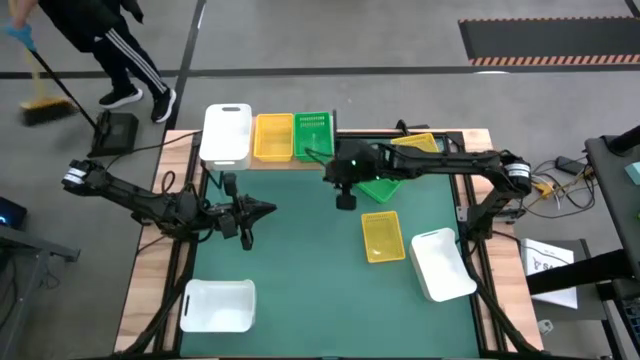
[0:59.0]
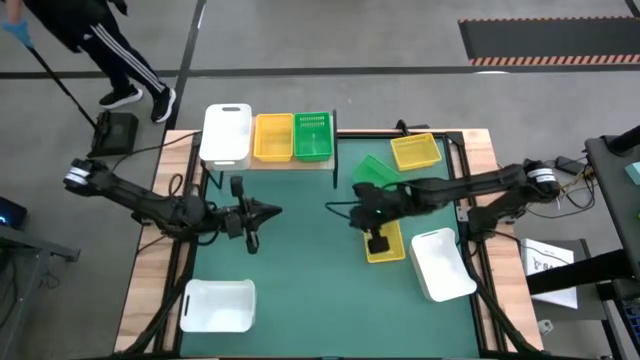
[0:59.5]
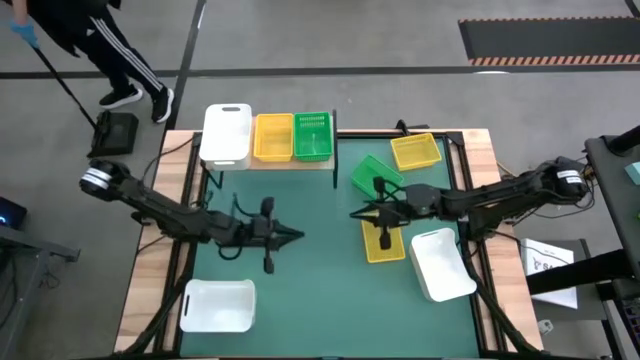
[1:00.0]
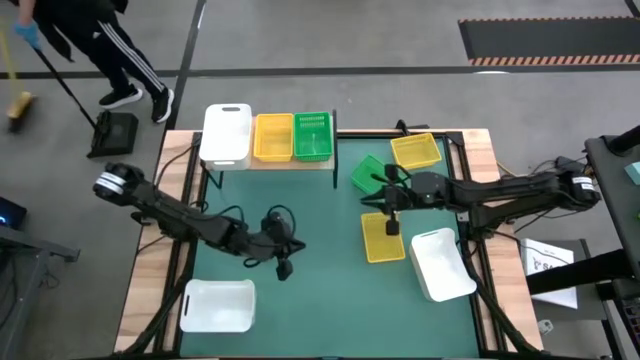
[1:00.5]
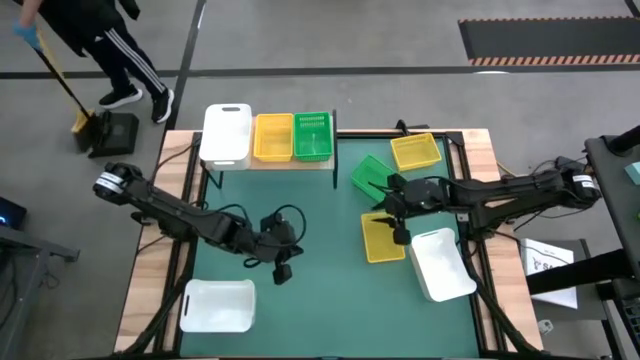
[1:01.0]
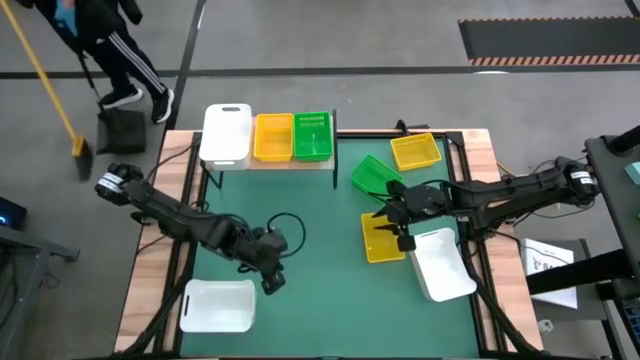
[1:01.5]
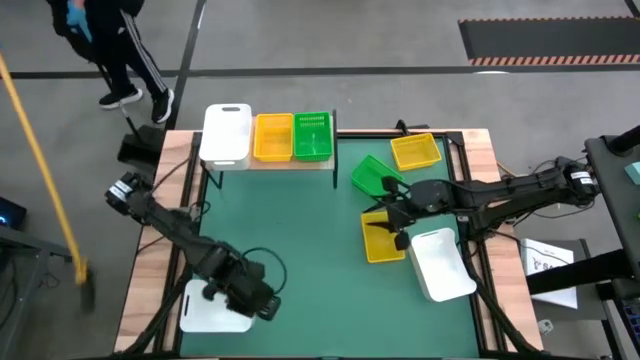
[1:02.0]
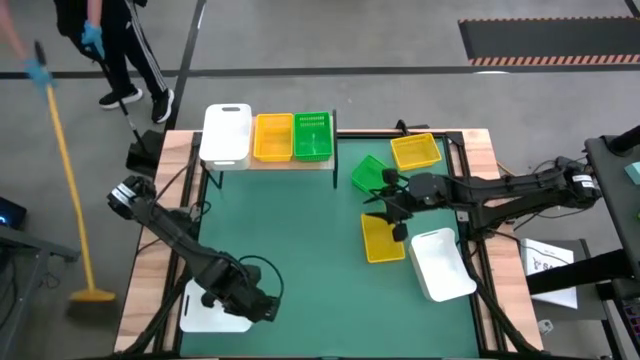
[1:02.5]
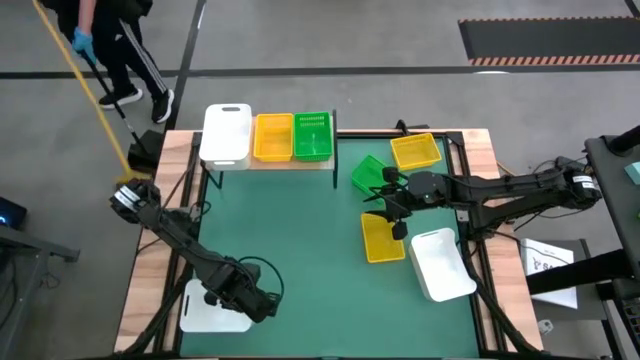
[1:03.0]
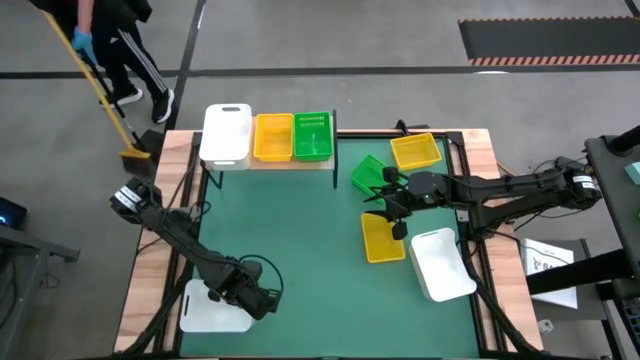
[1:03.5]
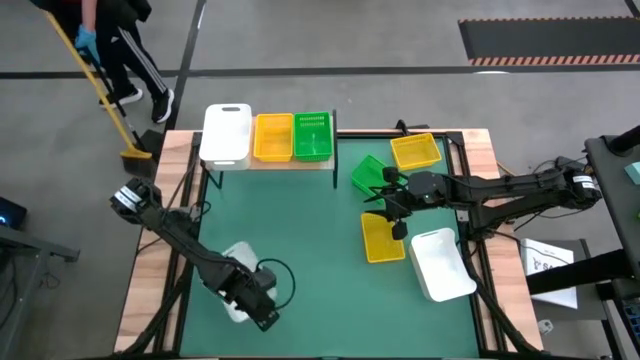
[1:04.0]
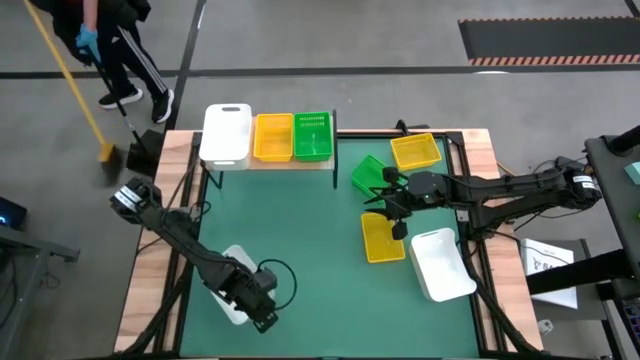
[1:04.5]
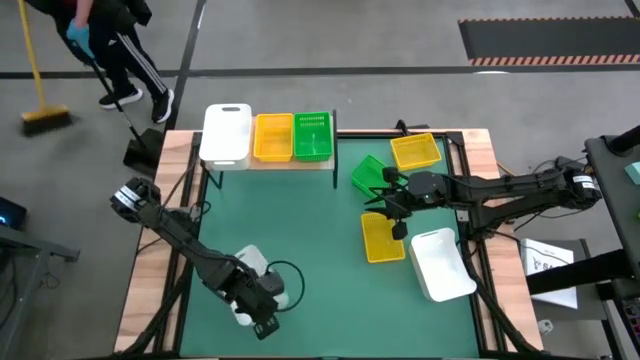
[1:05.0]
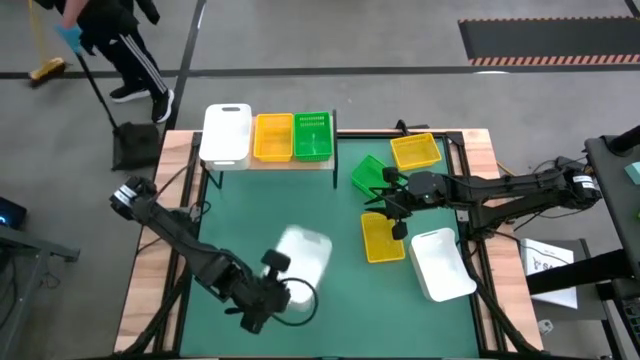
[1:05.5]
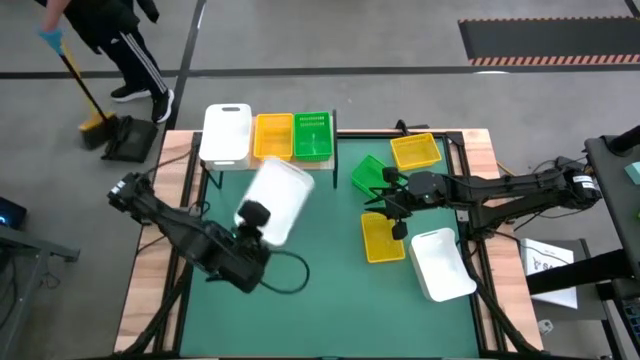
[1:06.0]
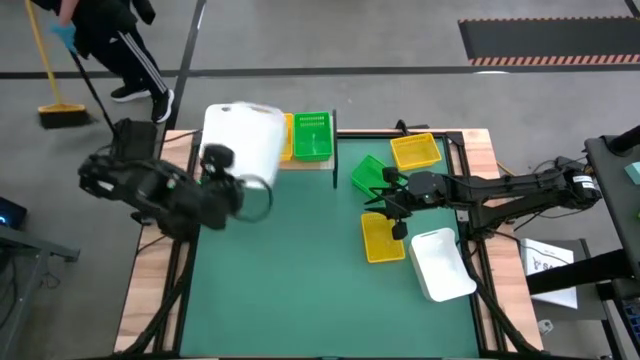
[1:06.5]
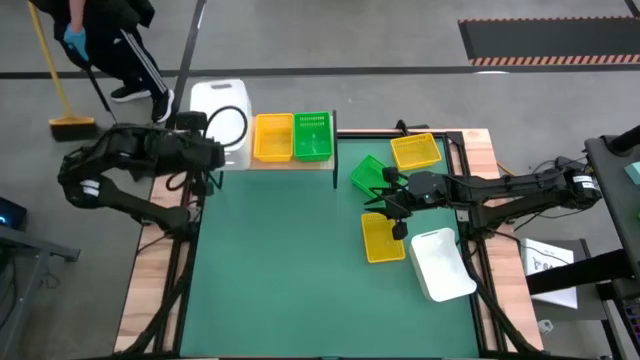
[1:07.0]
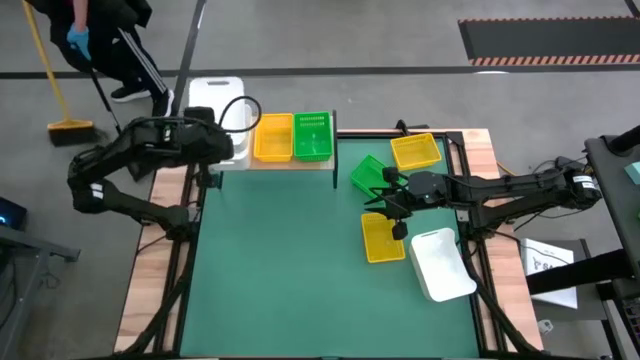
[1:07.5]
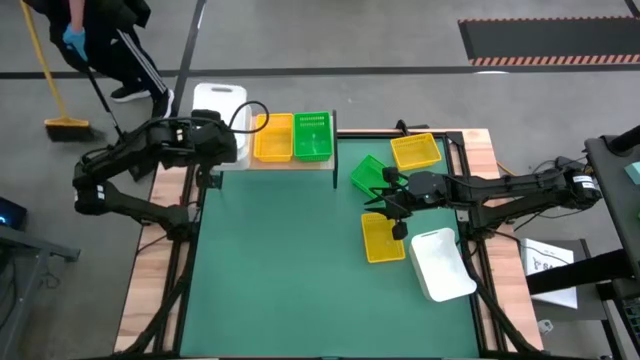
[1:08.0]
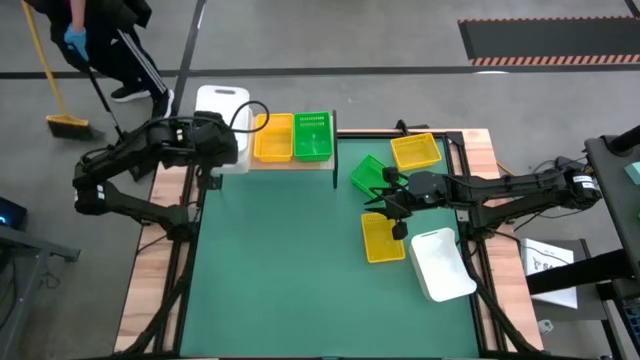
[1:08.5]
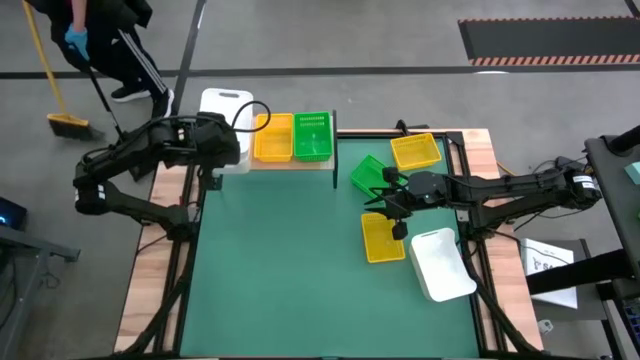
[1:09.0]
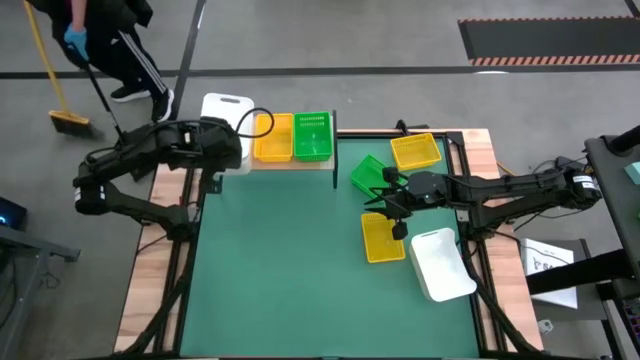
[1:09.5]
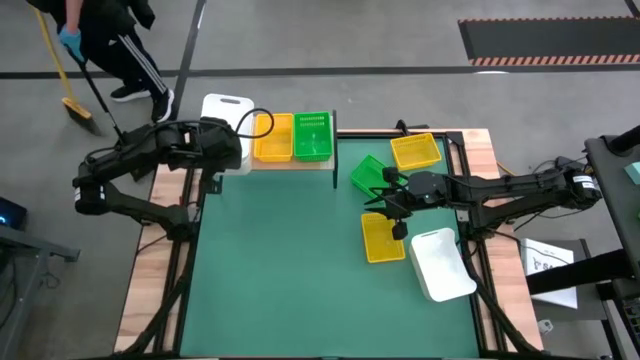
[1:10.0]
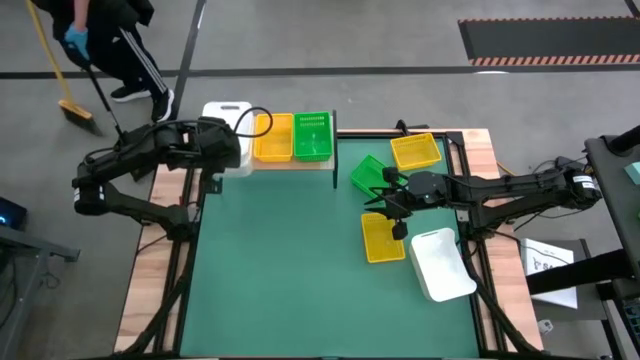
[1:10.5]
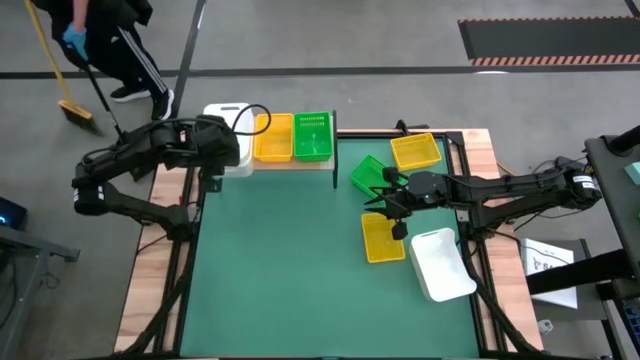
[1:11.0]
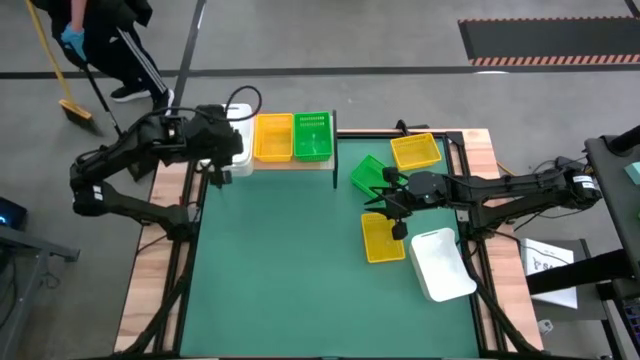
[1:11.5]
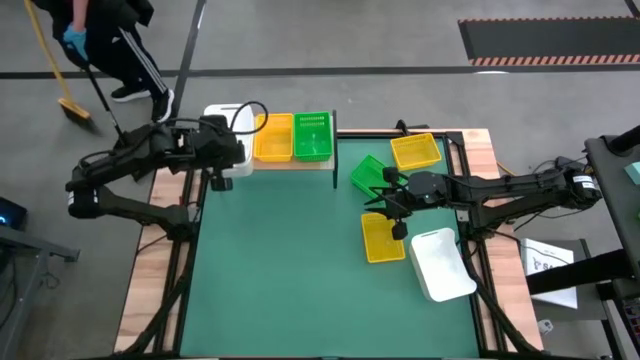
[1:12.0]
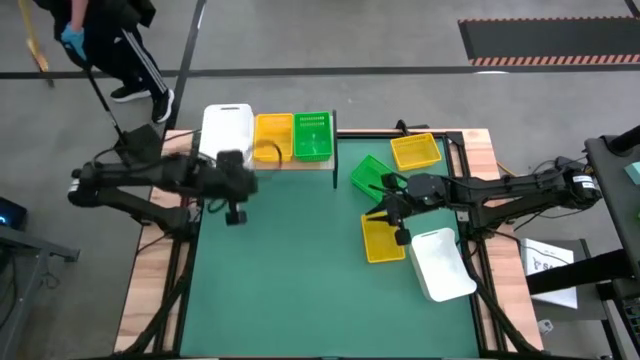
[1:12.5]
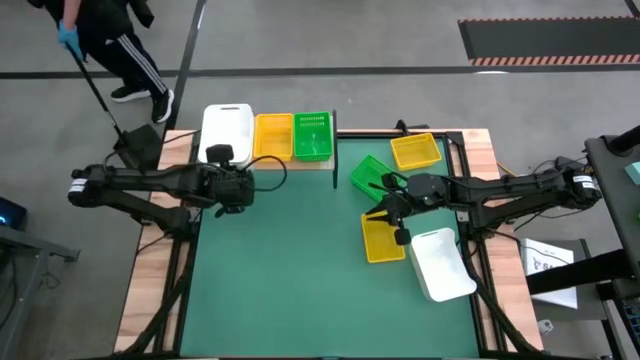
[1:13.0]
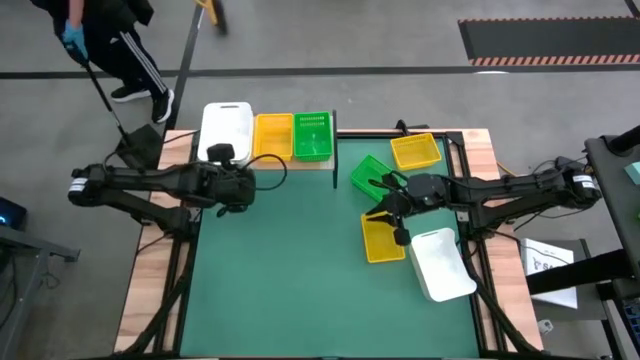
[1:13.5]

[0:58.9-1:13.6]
Stack the left white bin on the white bin on the shelf

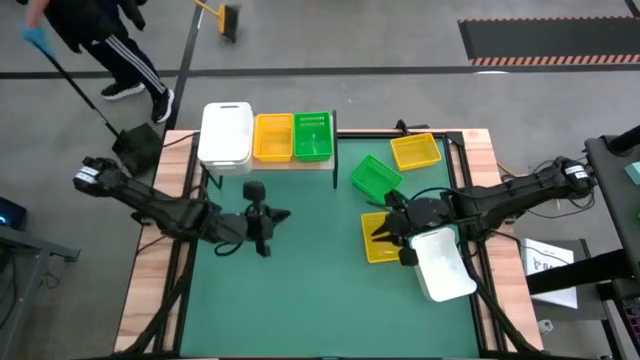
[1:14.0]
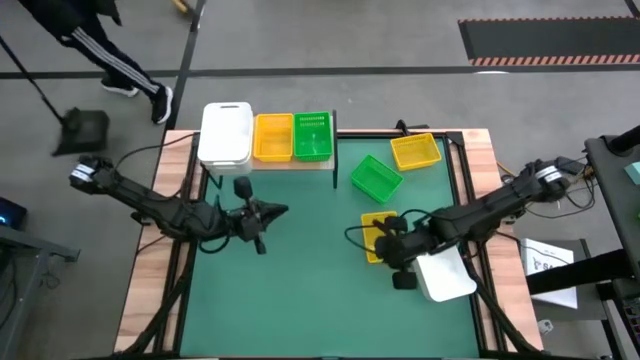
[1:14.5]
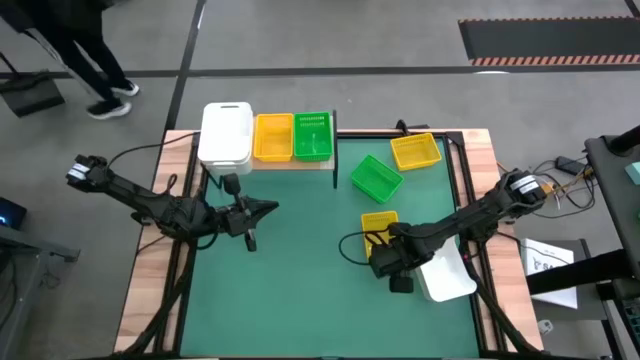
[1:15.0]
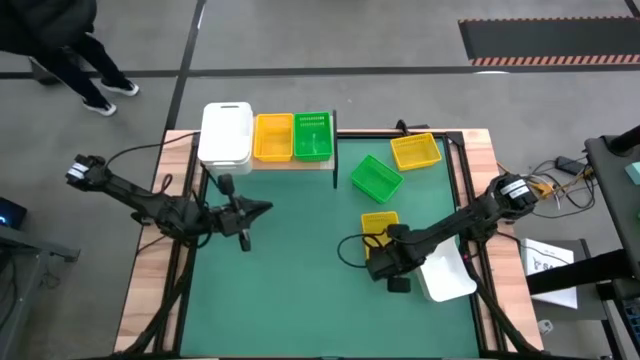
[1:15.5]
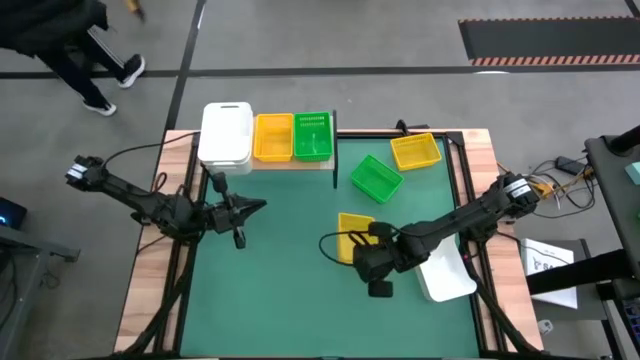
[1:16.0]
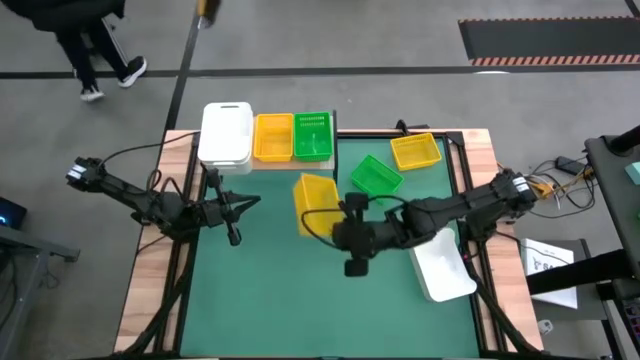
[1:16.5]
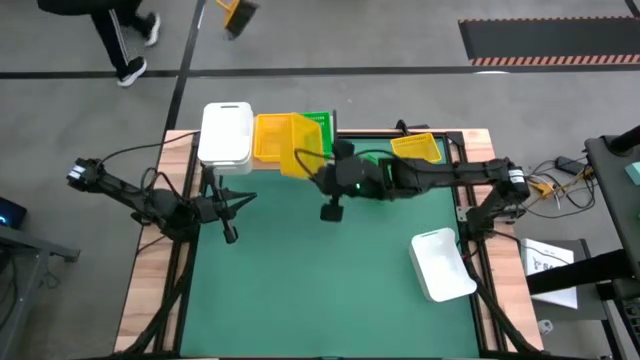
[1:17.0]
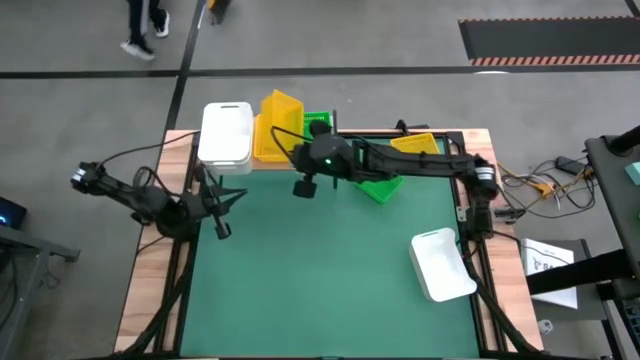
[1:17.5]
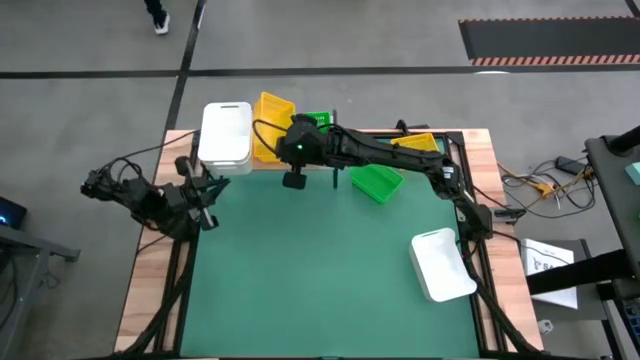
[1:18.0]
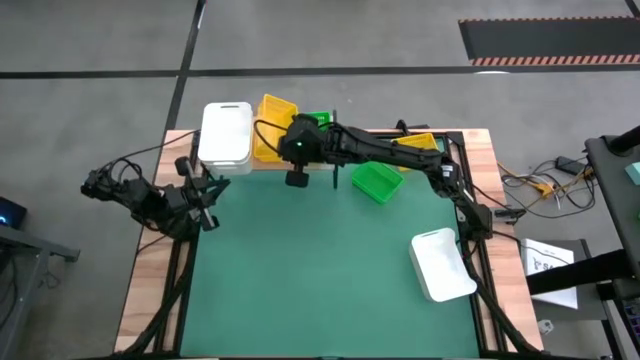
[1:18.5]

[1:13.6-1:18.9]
Stack the bottom yellow basket on the yellow basket on the shelf
